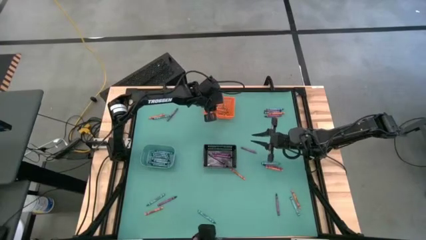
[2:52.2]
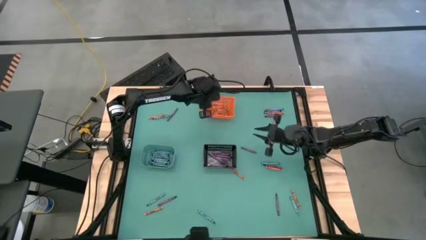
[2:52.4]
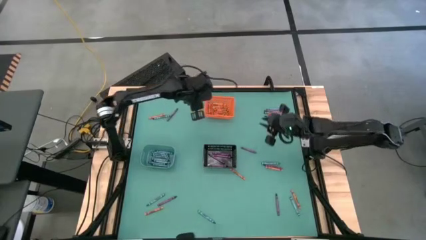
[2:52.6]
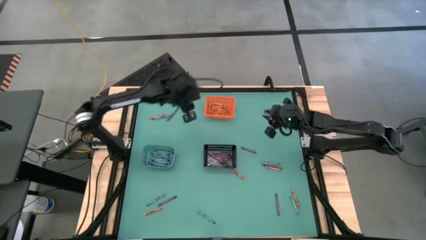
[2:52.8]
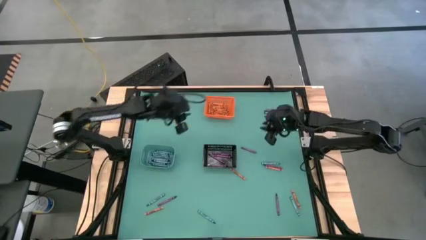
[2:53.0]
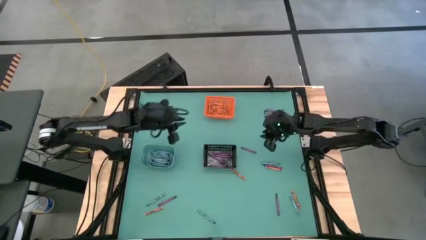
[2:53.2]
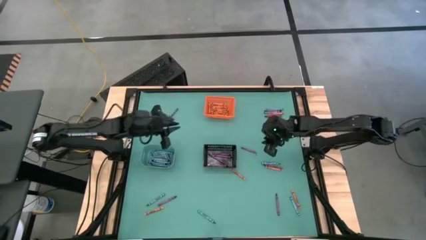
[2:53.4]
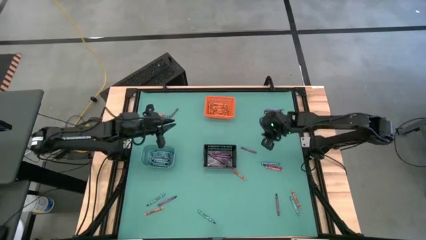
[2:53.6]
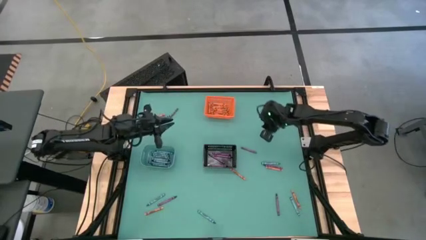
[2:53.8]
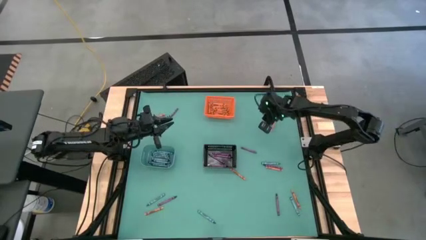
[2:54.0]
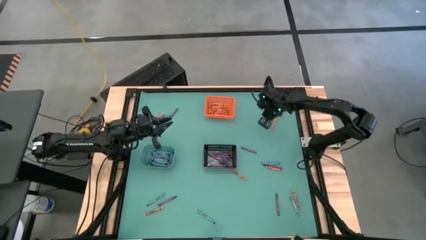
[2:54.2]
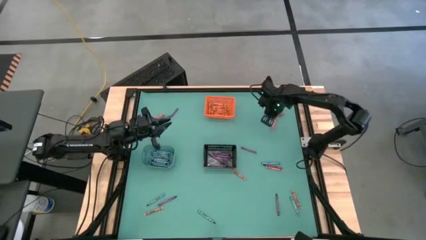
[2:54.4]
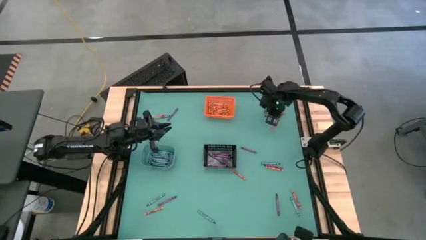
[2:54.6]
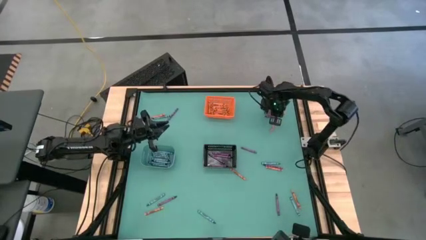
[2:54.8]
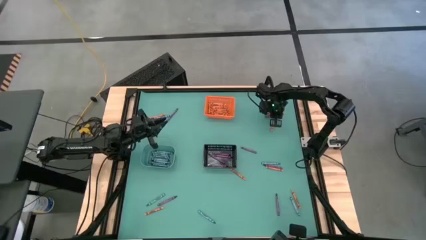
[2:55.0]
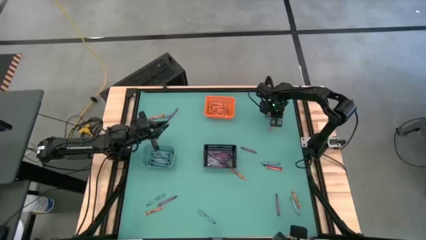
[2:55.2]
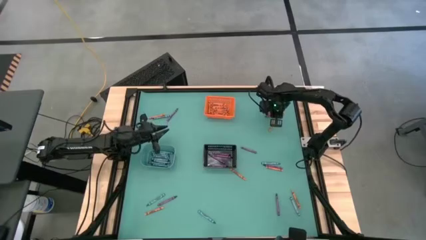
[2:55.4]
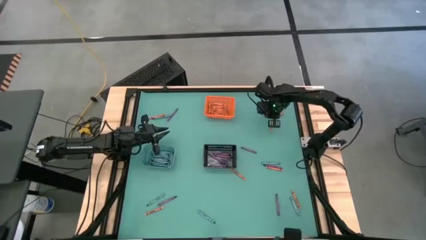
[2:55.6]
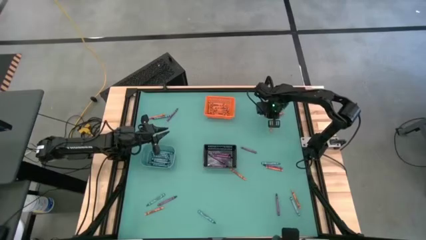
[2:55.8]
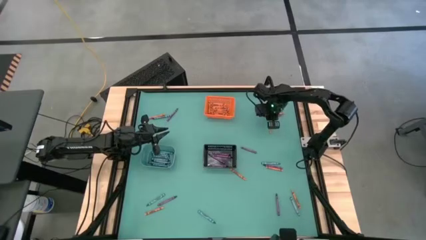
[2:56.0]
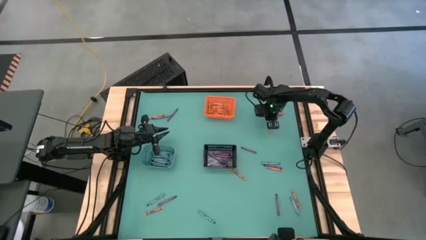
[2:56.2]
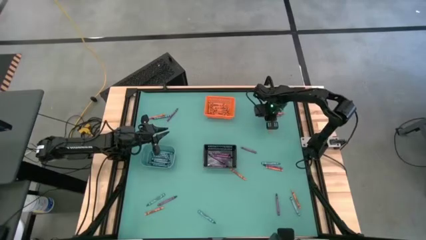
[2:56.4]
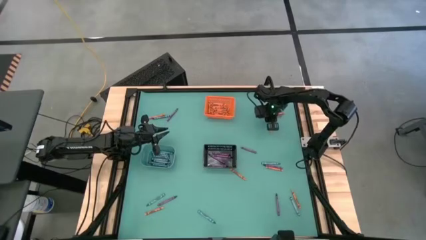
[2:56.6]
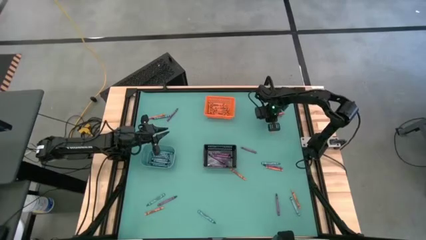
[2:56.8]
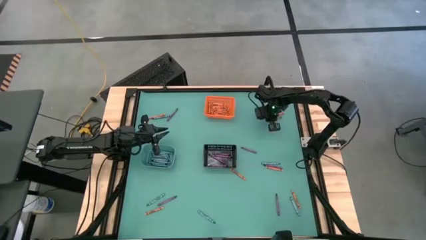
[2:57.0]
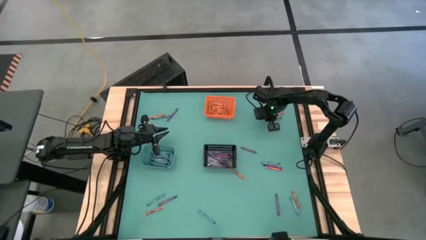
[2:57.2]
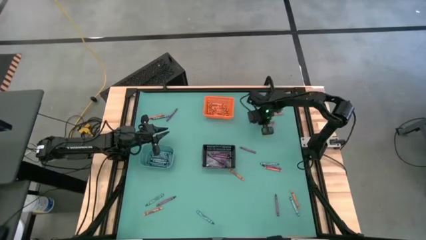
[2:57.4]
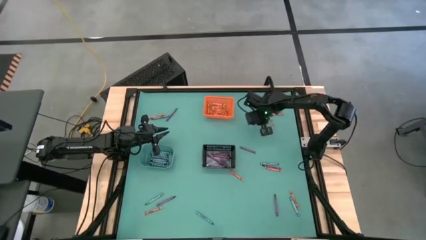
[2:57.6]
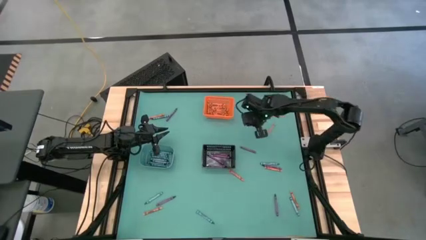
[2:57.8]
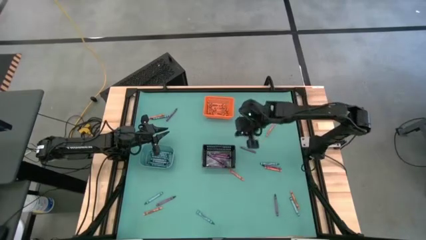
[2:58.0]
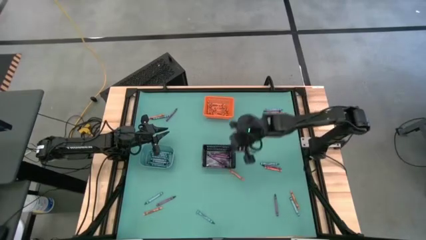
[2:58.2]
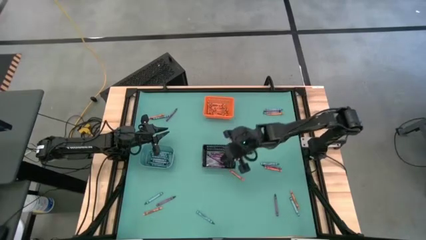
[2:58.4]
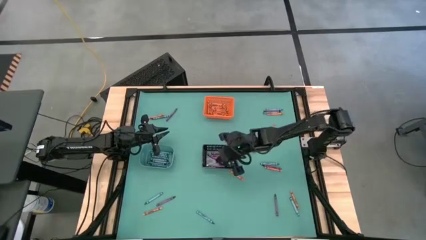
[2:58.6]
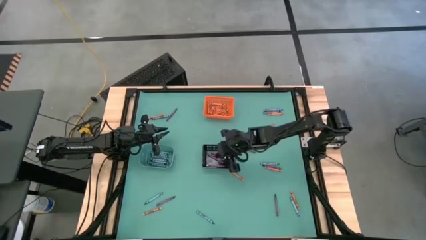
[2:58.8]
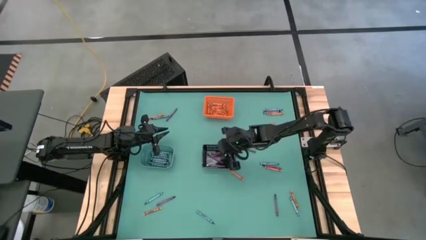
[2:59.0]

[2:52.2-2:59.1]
Task: Sort crayons
Put the violet crayon into the black bin

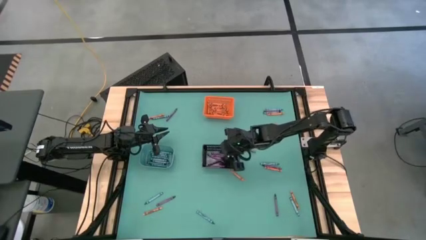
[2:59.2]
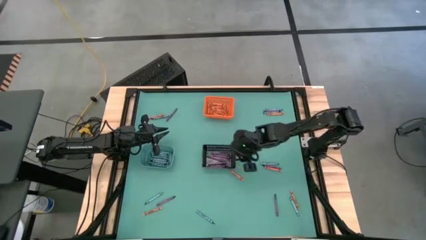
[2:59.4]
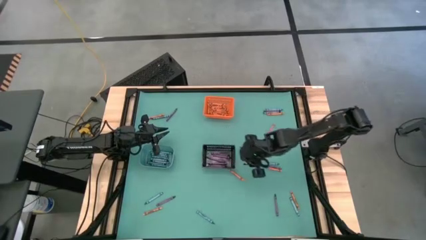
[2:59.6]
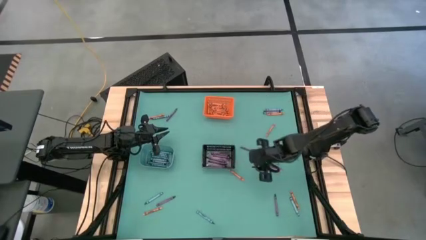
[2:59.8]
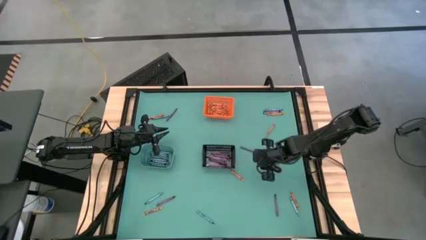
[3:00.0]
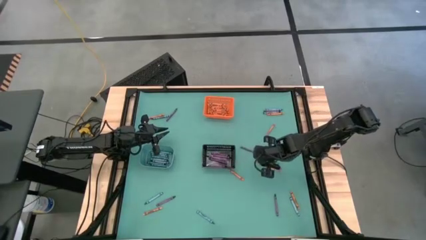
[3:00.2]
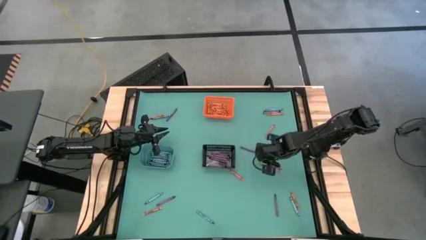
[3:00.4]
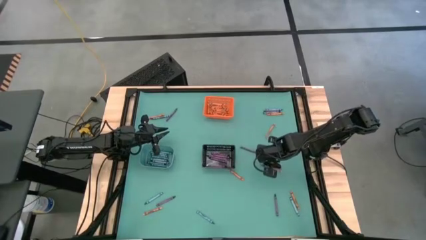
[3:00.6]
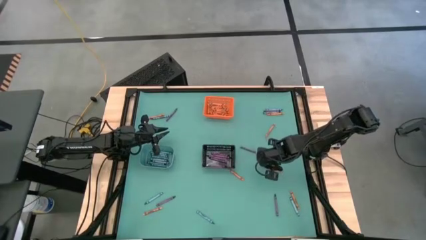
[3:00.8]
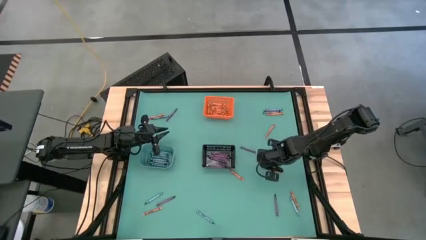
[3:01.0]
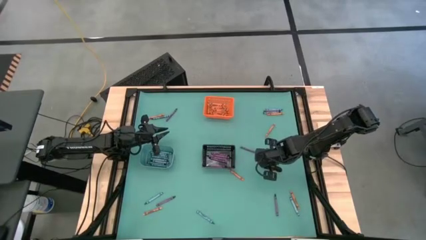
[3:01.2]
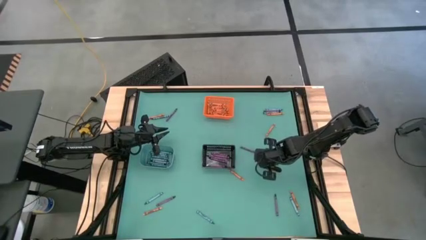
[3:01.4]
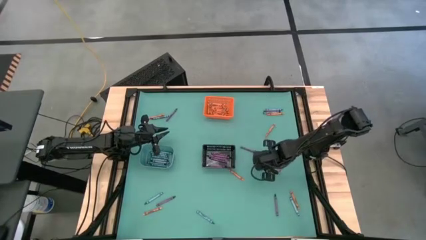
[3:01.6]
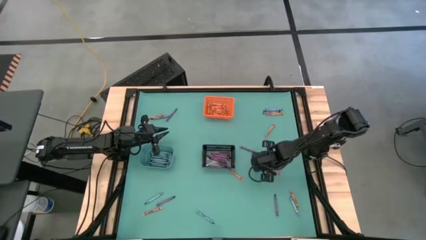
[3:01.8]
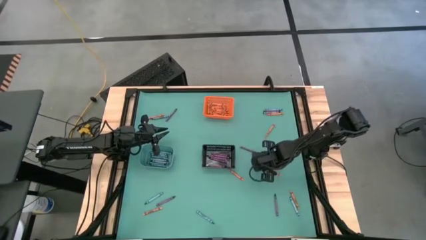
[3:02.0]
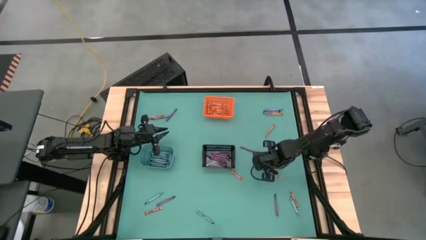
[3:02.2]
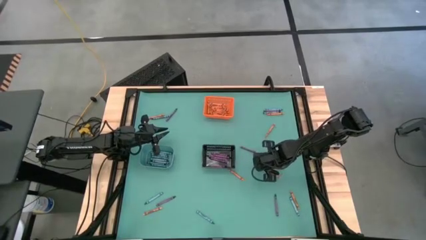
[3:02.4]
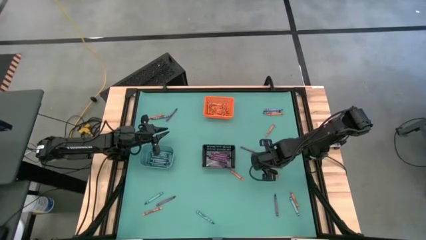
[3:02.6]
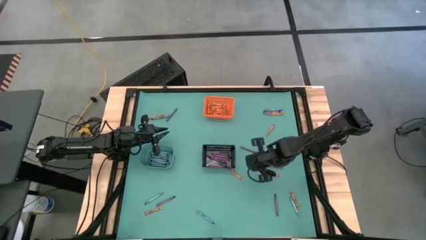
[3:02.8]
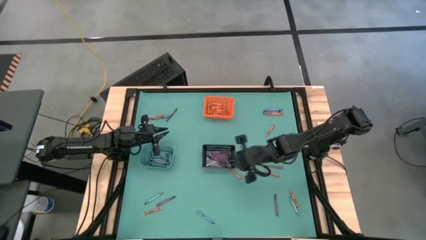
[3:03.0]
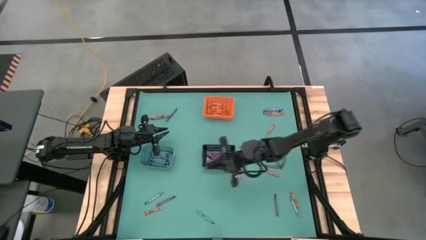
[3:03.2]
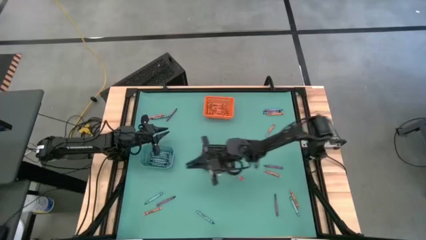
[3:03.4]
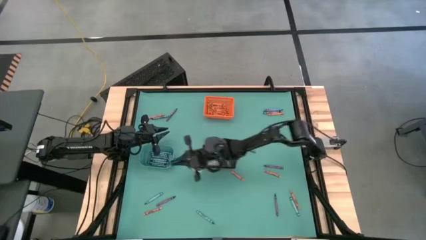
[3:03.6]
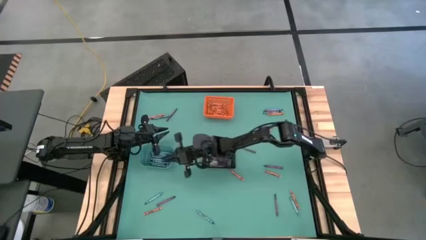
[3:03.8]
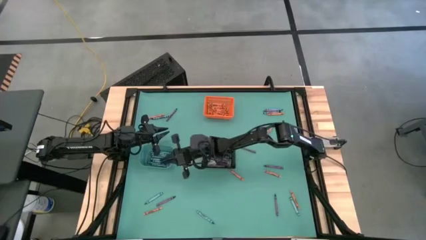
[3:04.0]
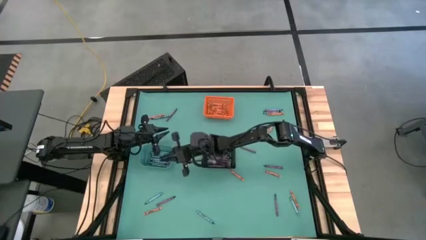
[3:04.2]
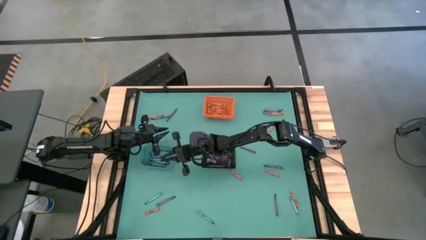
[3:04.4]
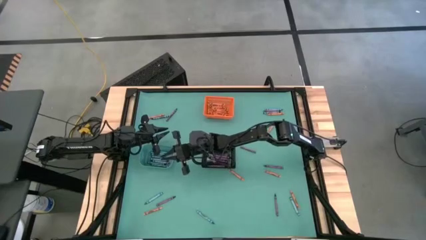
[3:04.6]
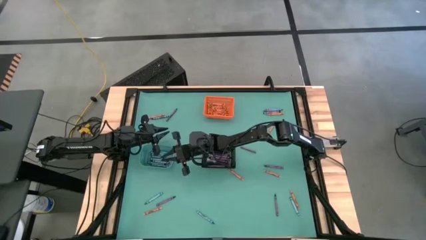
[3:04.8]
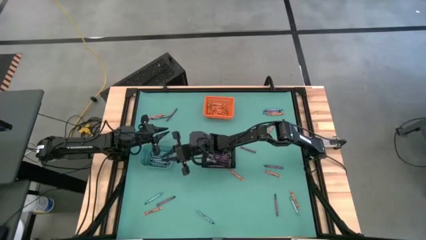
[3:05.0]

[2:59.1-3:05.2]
Put the blue crayon into the light blue bin

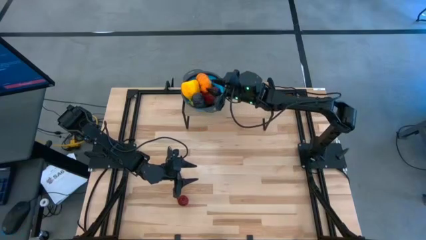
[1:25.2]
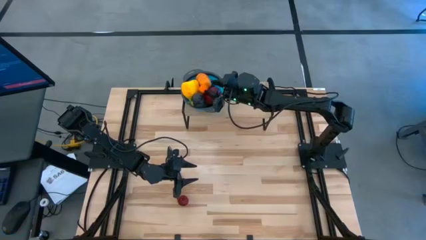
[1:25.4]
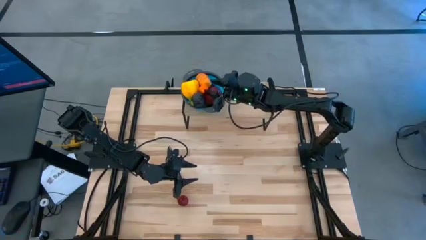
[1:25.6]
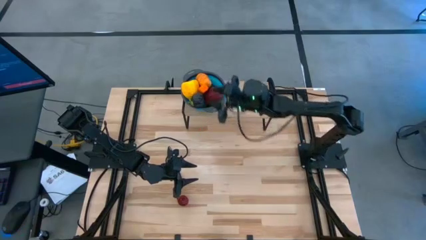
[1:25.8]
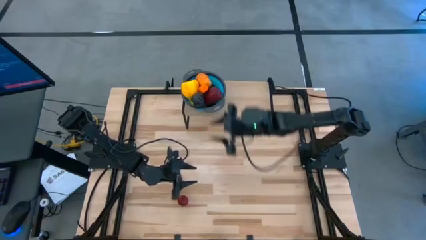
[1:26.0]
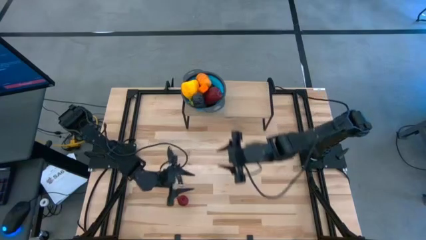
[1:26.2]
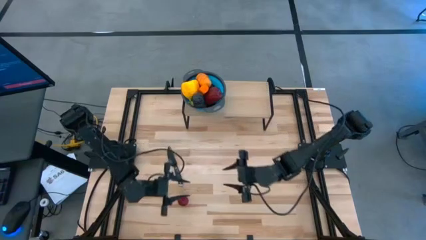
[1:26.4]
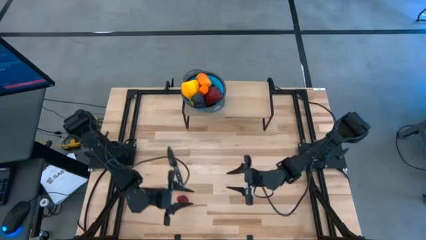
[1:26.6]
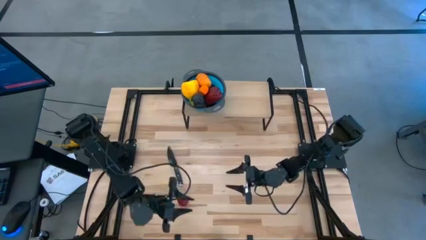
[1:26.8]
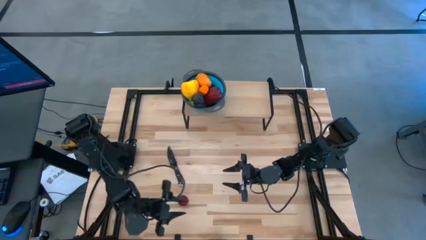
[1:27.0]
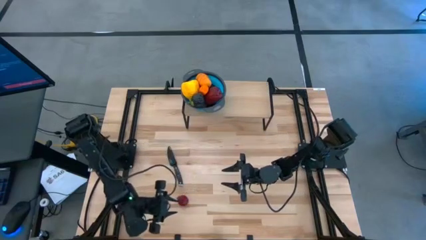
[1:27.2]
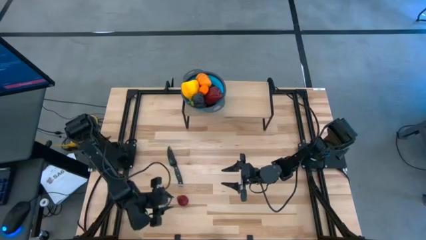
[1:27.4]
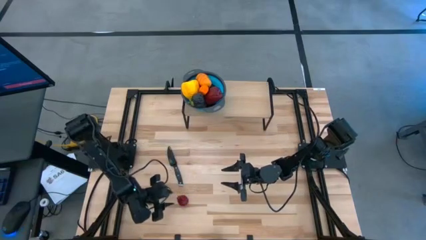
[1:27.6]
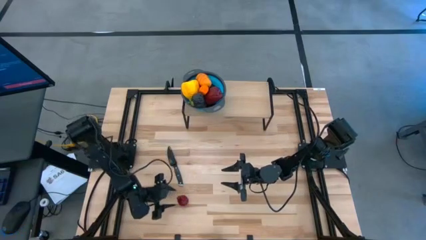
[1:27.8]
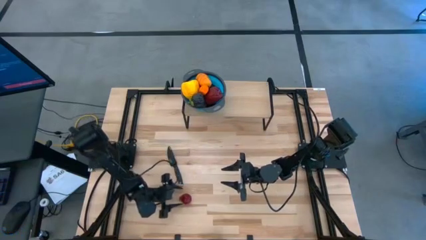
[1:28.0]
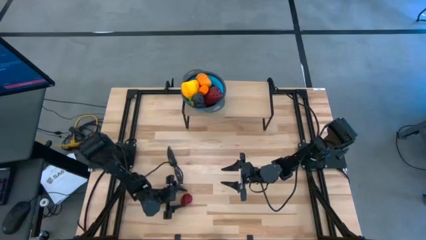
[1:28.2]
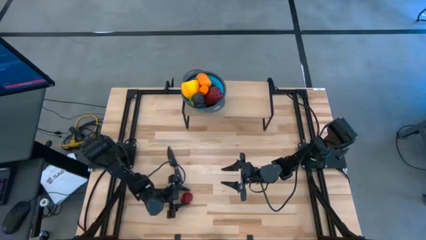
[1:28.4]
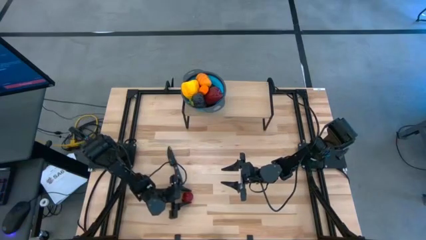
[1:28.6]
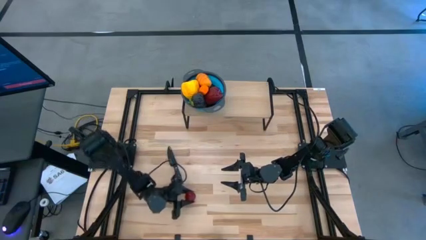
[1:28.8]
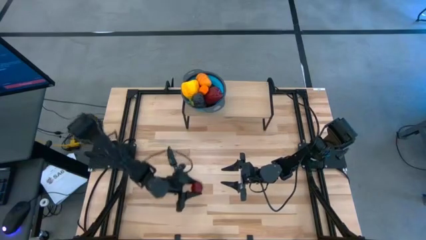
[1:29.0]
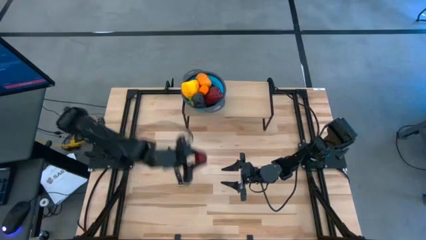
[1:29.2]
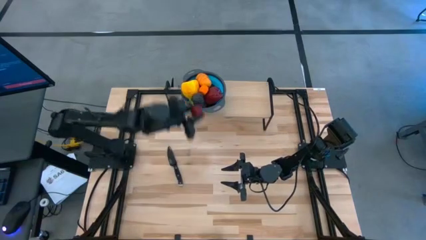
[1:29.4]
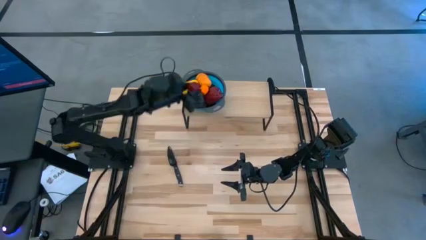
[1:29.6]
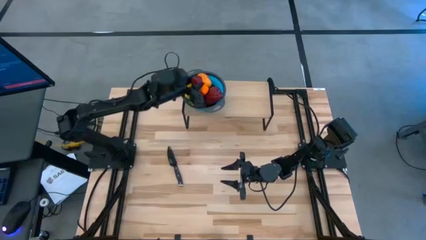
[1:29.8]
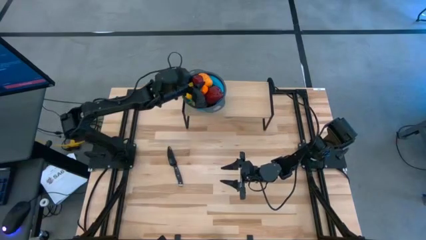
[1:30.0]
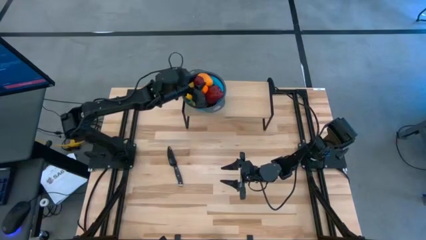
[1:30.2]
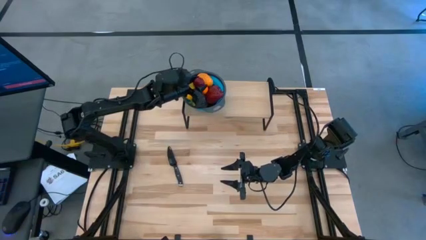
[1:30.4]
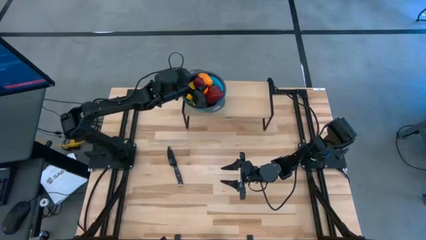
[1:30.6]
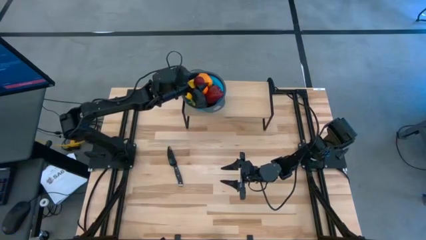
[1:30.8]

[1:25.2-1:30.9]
Task: Pick & Place Fruit
Put the pomegranate into the blue strainer bowl on the shelf
